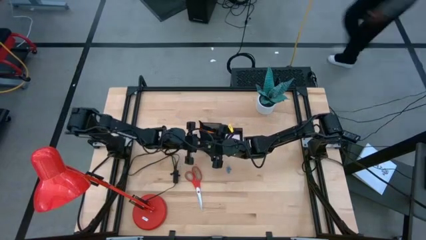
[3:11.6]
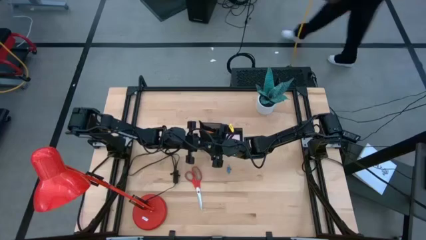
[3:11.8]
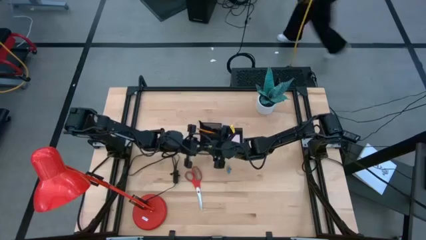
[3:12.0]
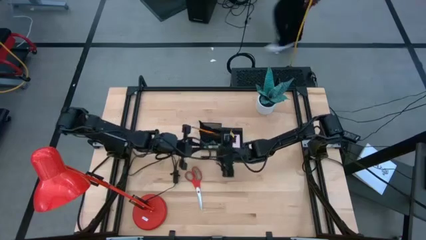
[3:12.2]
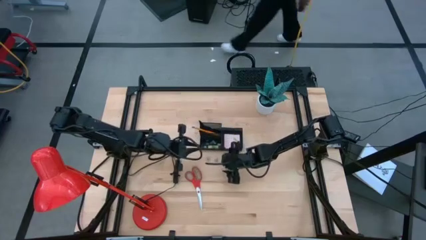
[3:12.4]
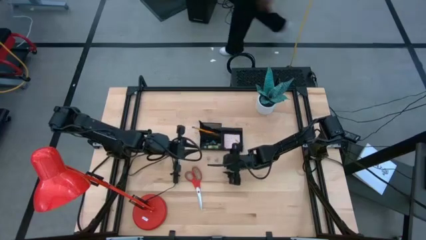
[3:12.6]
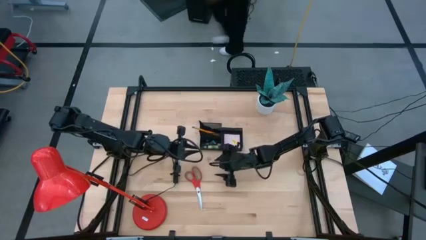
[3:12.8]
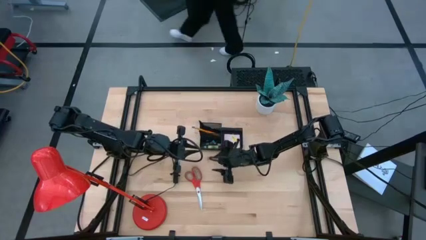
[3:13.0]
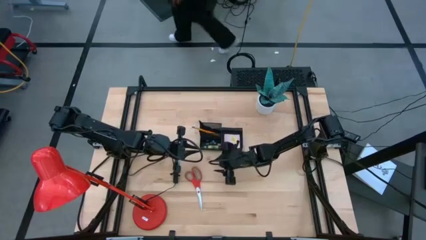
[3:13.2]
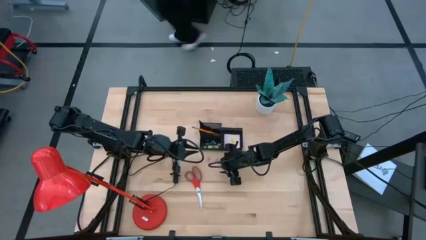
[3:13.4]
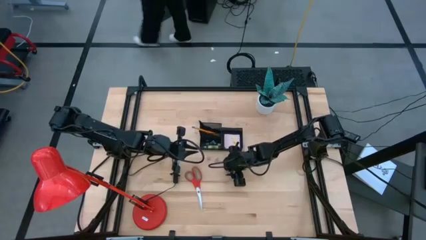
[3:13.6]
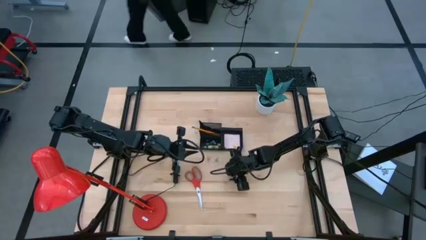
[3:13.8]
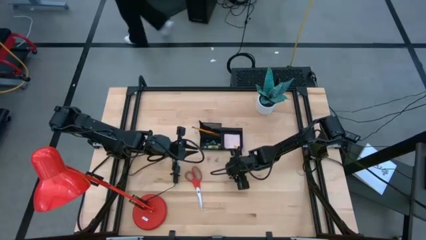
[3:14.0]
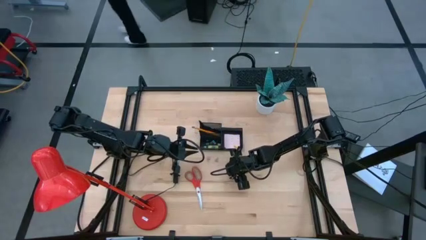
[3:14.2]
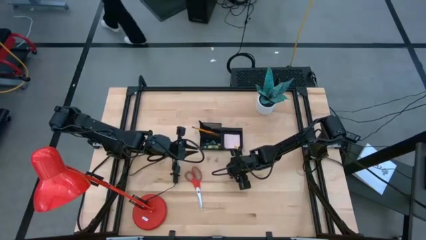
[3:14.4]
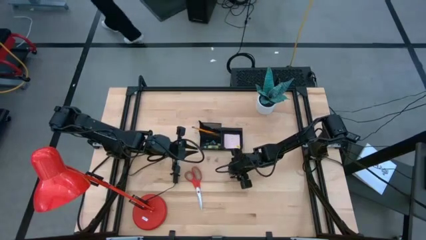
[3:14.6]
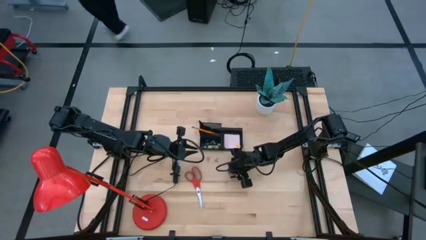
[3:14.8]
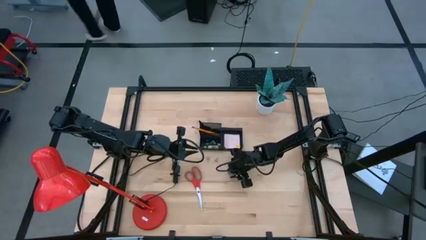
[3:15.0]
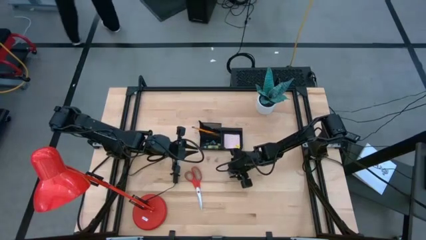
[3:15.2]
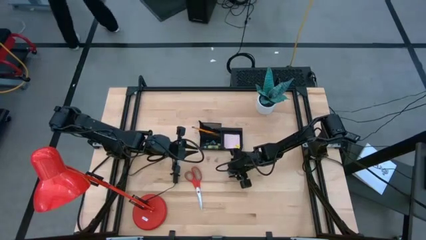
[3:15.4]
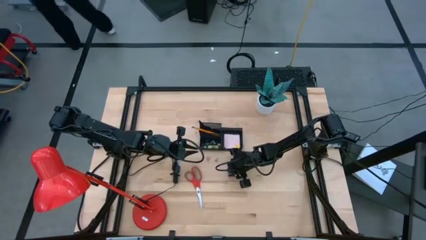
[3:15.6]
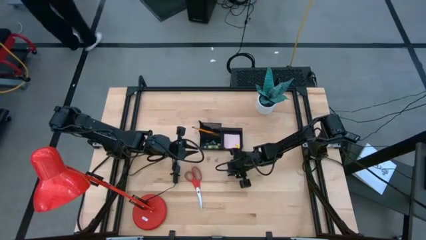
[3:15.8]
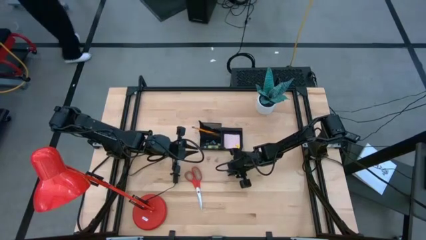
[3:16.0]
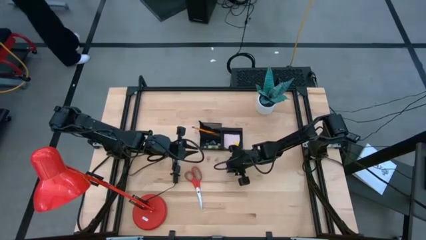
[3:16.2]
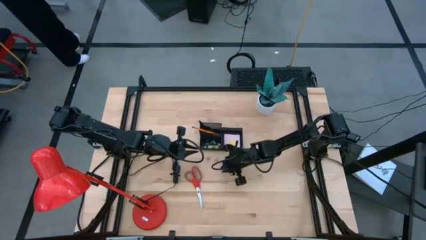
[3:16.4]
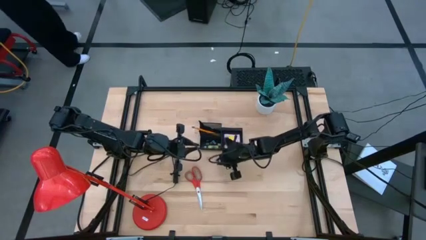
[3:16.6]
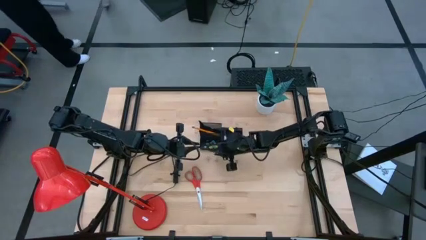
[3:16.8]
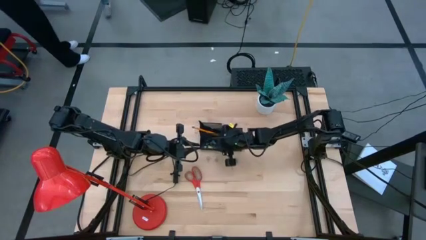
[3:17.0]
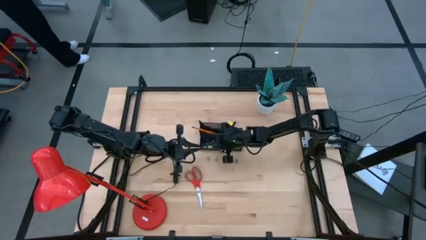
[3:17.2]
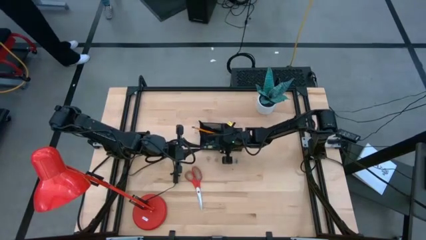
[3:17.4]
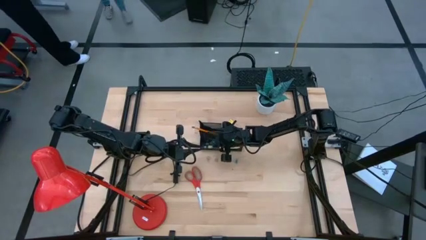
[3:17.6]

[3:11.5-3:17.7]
Task: Pick and place office supplies into organizer
Put the blue binder clip into the black desk organizer

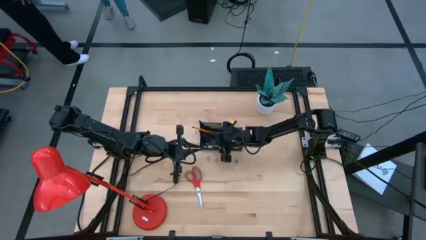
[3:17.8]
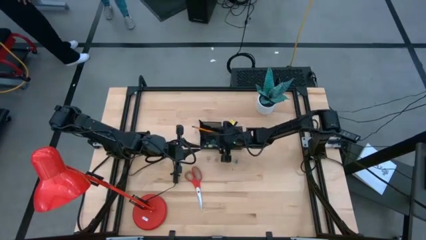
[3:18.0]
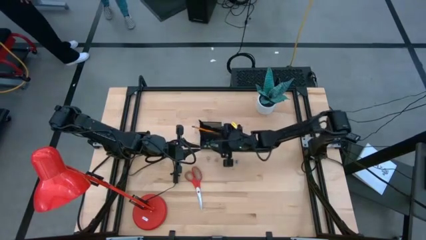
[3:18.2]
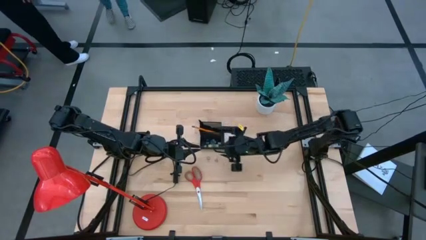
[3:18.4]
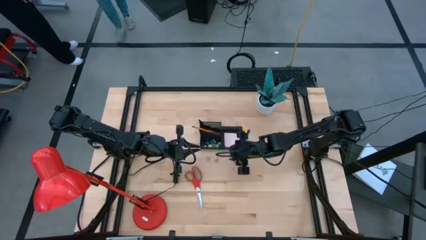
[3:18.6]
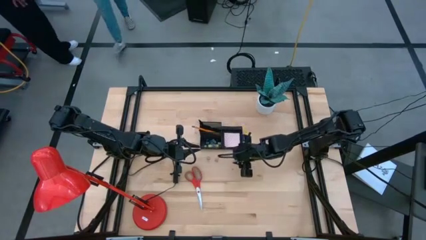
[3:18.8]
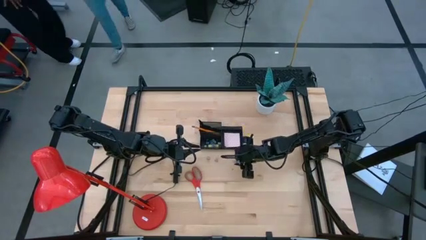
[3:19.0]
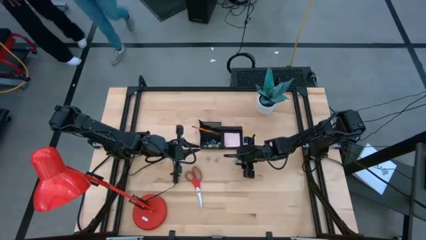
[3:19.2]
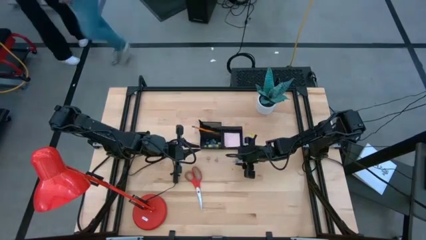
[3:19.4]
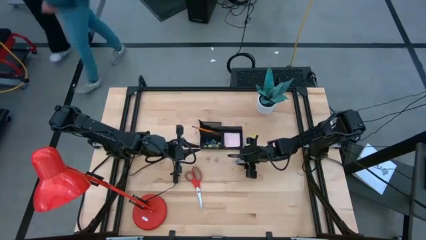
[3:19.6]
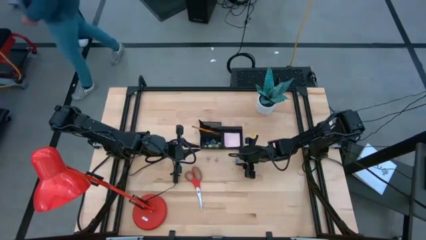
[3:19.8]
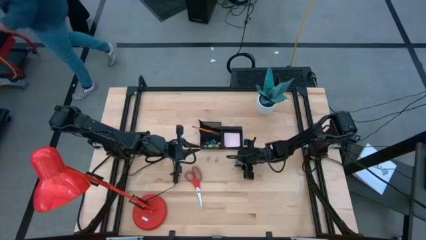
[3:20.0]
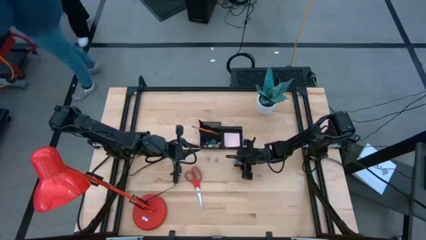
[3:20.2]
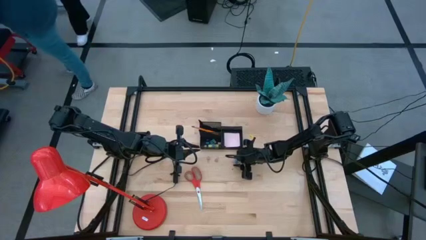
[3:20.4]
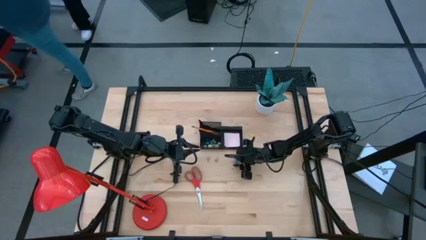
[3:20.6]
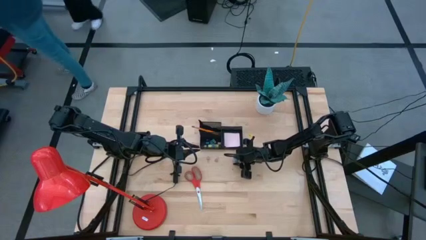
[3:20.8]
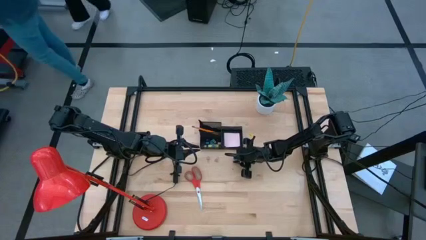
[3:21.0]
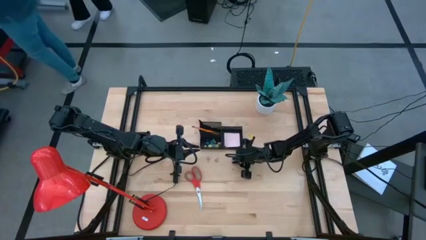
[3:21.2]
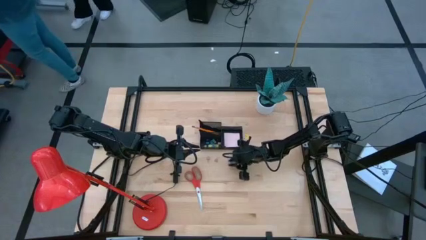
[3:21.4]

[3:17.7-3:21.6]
Put the blue binder clip into the black desk organizer

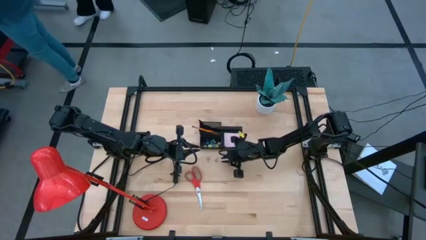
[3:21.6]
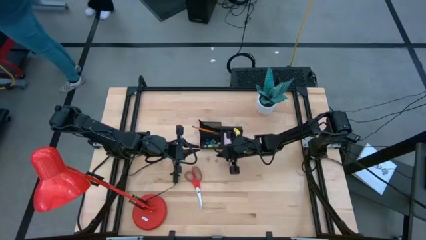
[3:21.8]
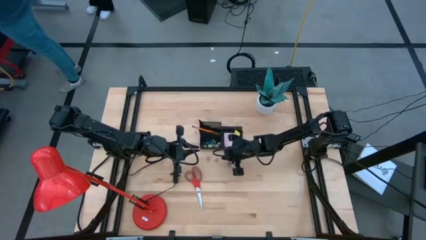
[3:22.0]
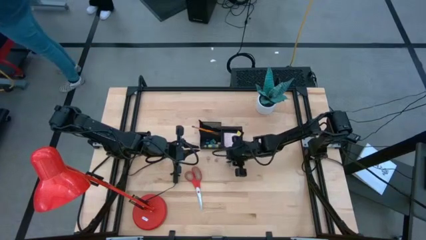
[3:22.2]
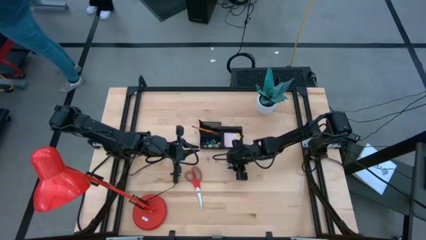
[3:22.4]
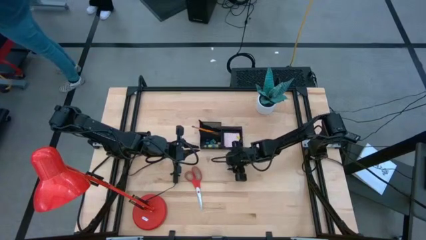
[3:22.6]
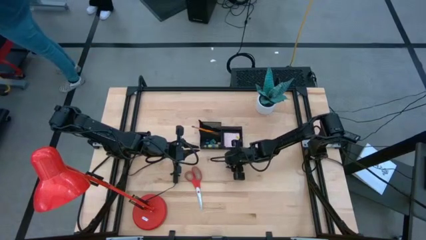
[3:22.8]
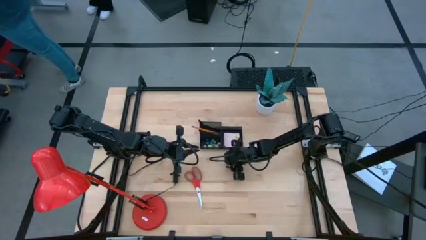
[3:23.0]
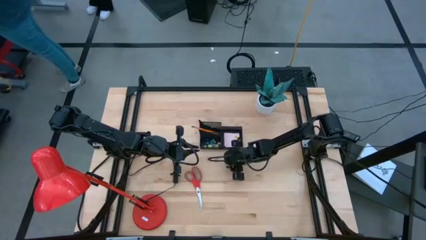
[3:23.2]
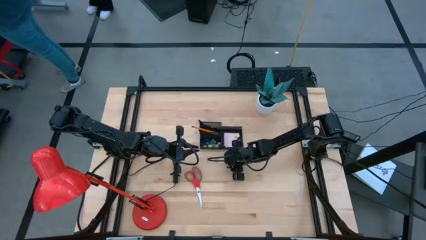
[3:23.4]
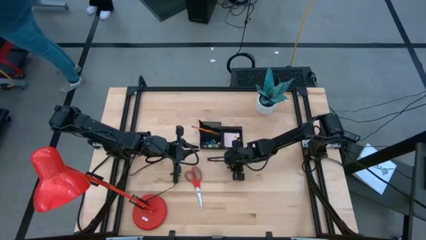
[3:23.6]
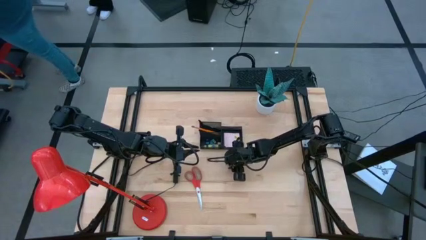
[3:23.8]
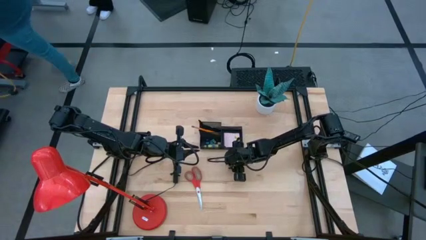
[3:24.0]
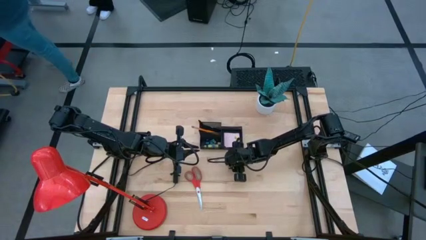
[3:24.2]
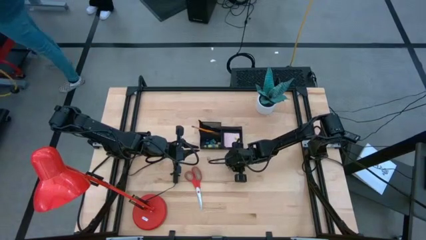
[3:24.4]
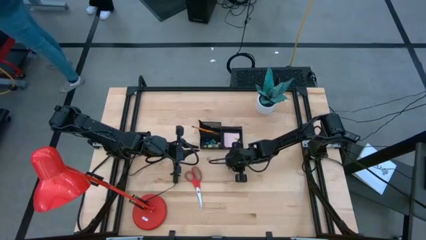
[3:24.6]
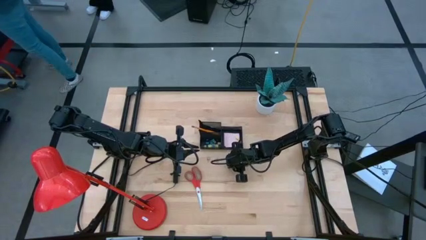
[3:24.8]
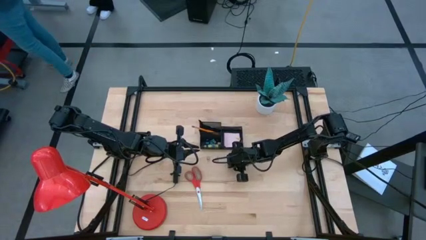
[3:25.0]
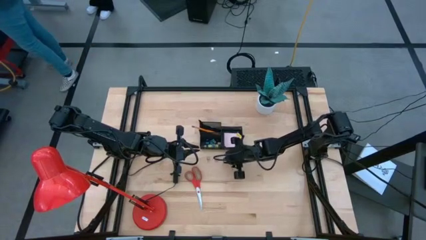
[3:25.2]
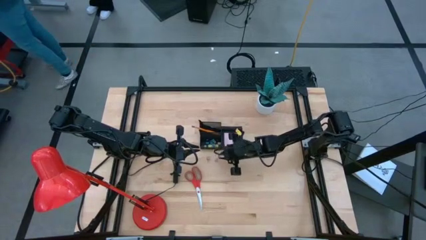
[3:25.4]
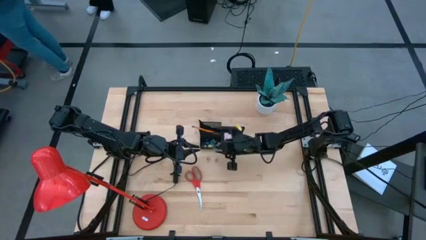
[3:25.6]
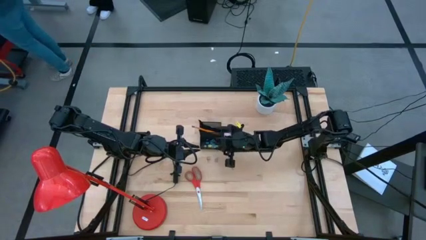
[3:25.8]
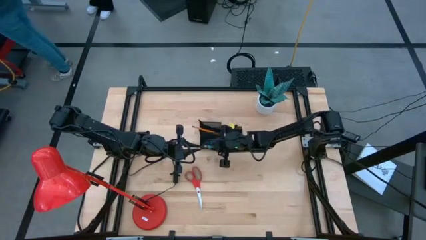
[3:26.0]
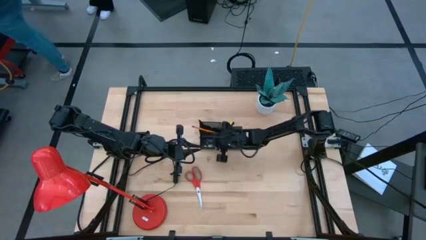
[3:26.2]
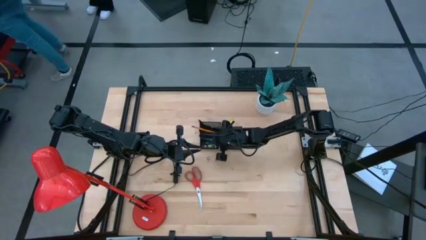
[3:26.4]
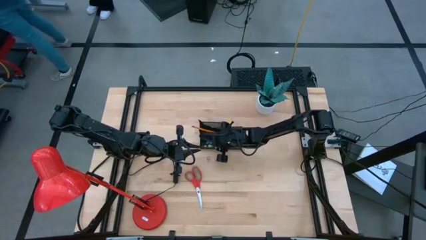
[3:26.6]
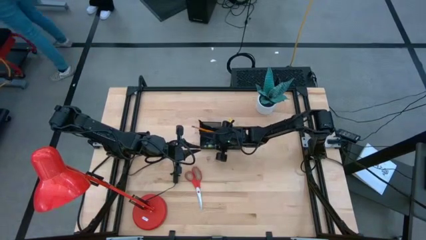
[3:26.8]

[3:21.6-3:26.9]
Put the blue binder clip into the black desk organizer

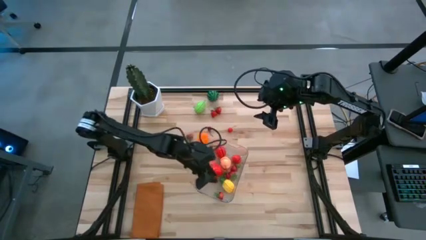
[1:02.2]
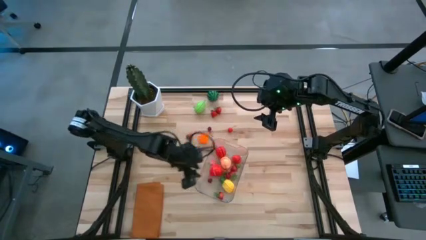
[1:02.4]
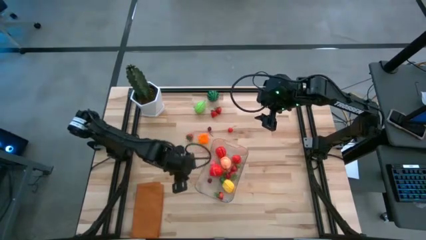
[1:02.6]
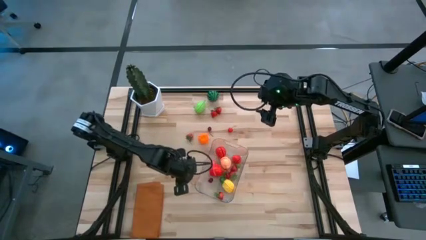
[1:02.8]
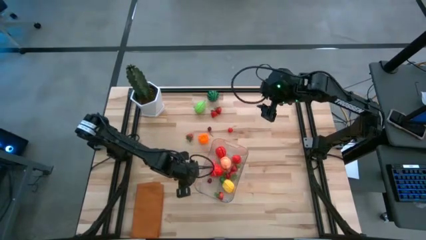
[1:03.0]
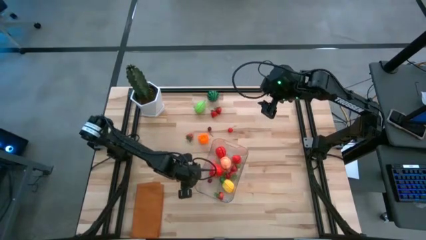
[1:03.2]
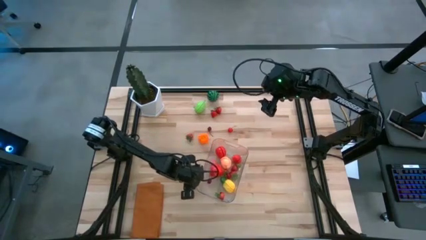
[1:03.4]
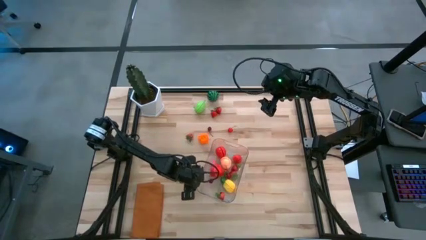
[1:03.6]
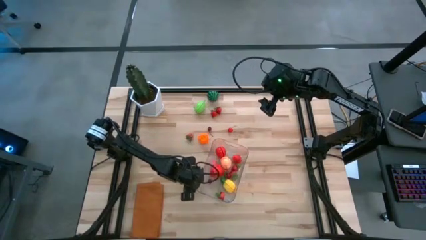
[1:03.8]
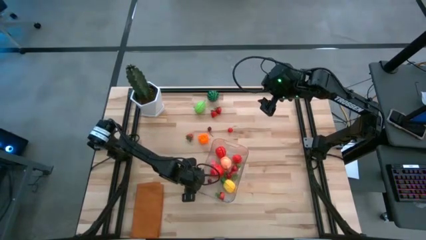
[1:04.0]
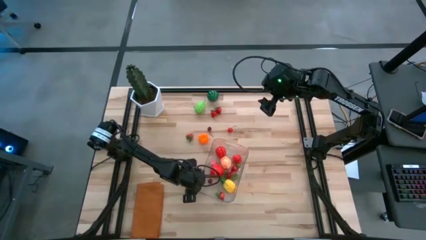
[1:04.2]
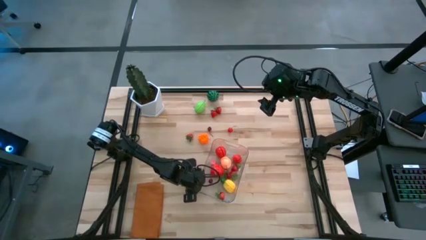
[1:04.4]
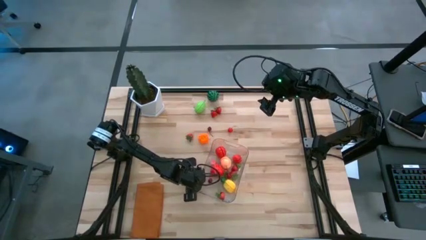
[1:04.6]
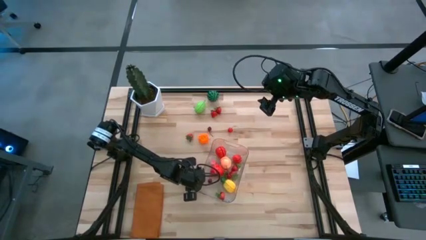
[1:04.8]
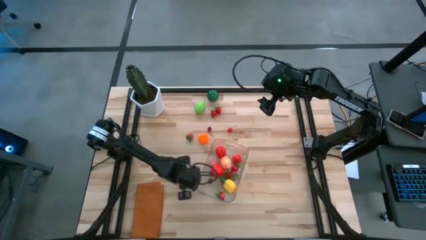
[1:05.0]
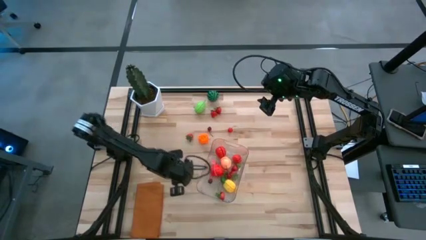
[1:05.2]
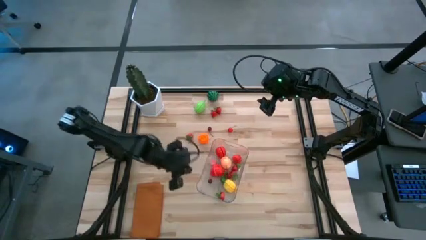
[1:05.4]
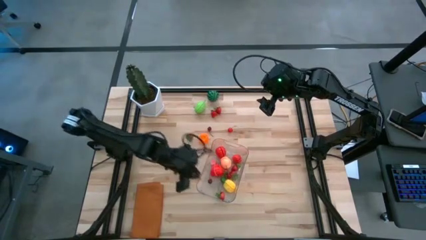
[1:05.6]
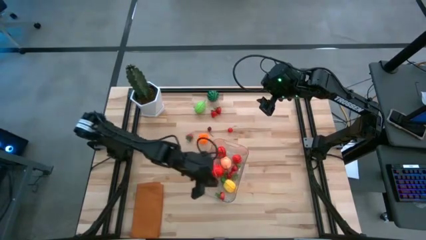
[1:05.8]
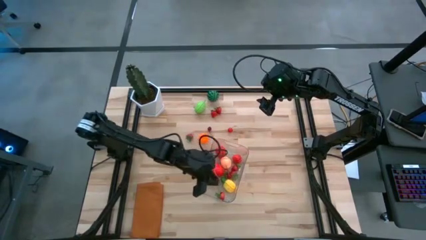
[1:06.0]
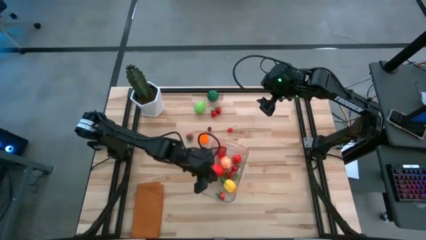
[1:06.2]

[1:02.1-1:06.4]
Task: Pick and placing Produce into tupperware
Put the red cherry into the transparent bin
